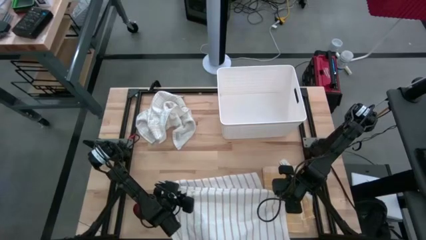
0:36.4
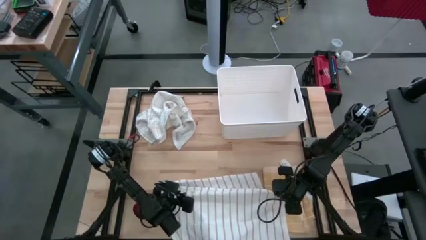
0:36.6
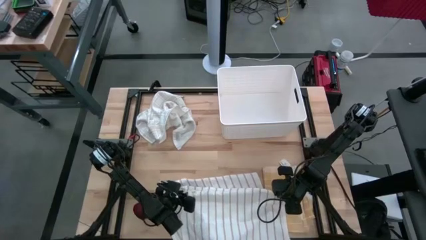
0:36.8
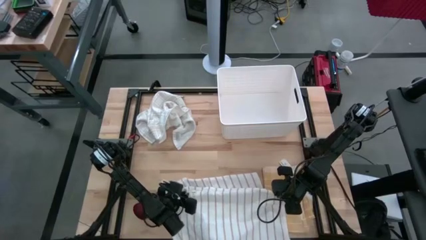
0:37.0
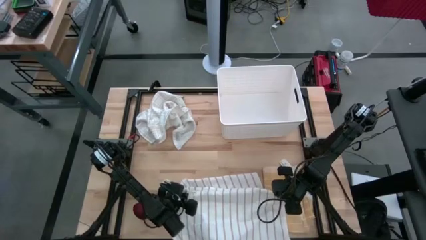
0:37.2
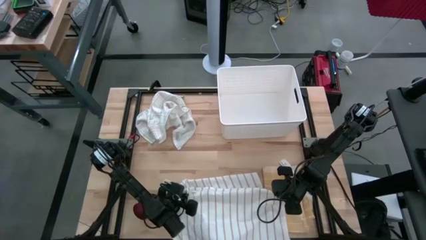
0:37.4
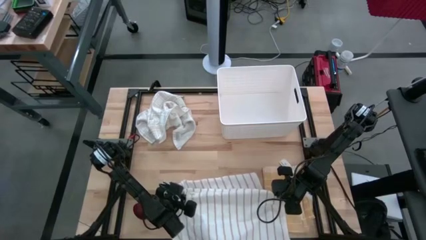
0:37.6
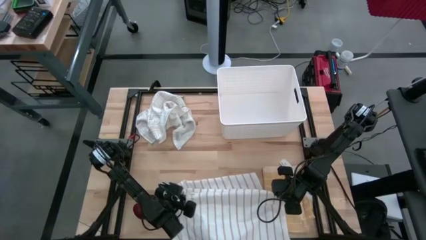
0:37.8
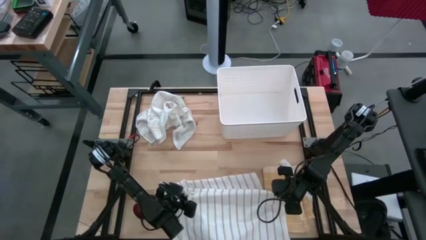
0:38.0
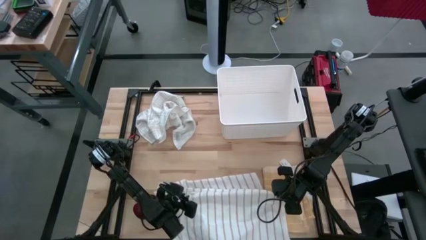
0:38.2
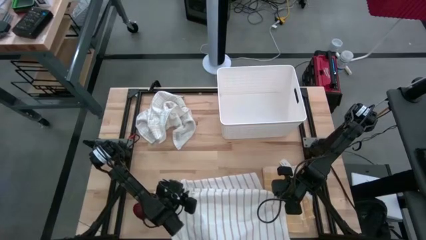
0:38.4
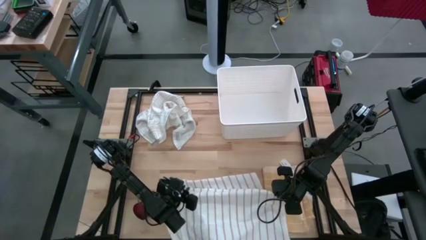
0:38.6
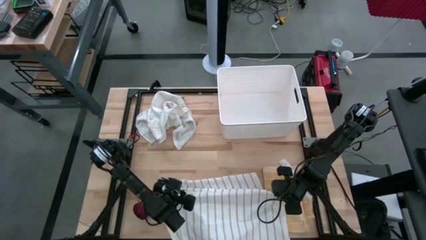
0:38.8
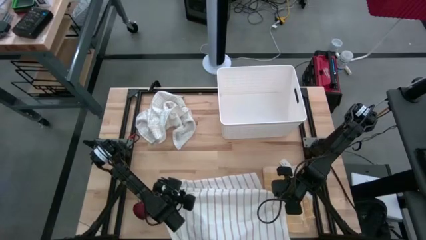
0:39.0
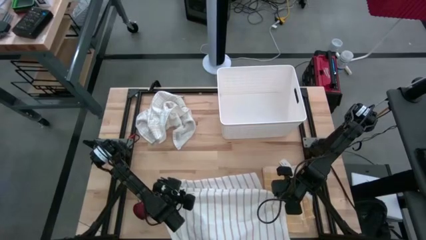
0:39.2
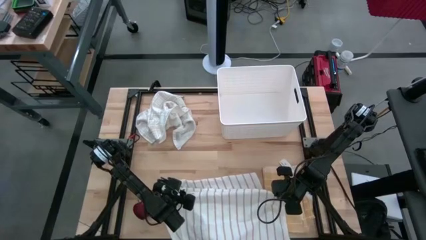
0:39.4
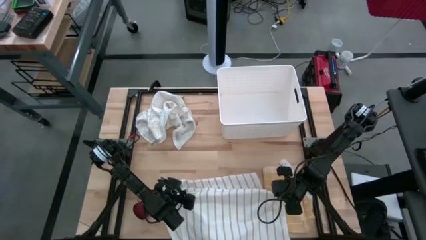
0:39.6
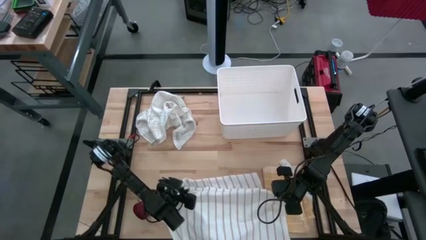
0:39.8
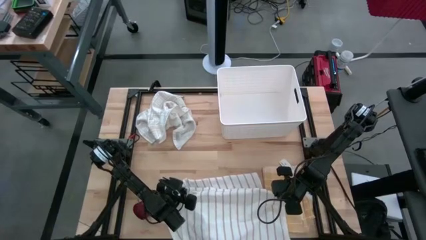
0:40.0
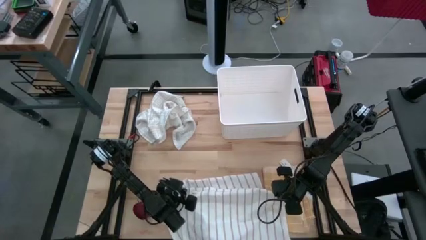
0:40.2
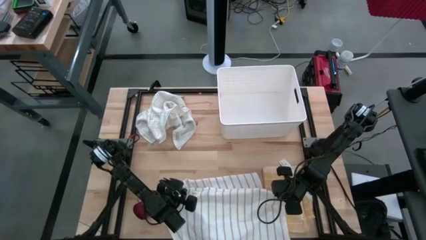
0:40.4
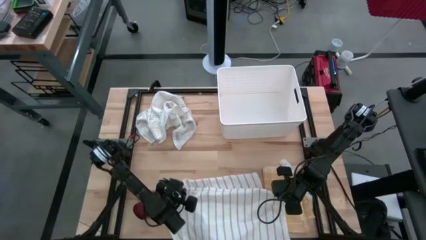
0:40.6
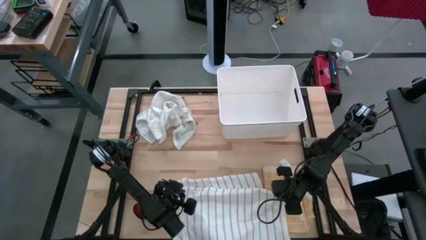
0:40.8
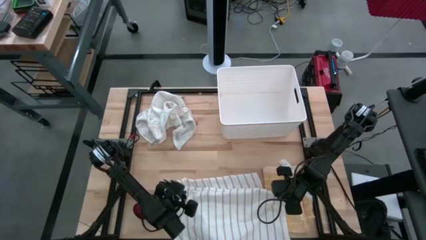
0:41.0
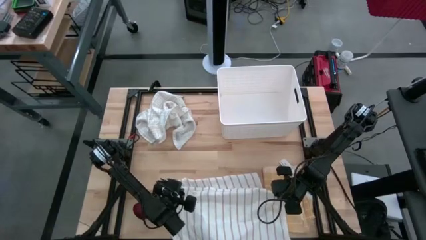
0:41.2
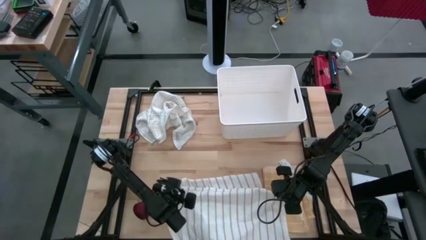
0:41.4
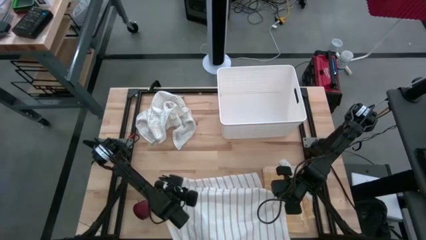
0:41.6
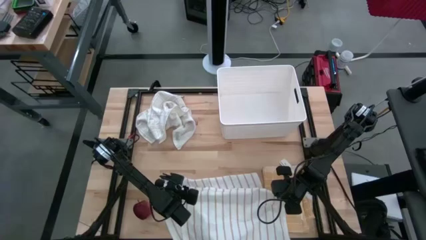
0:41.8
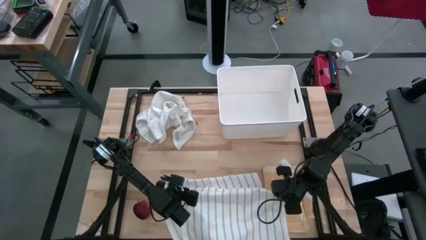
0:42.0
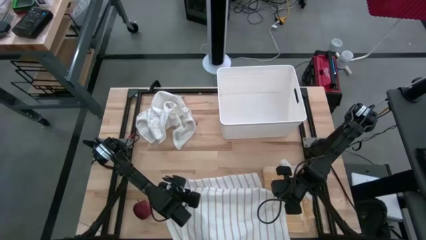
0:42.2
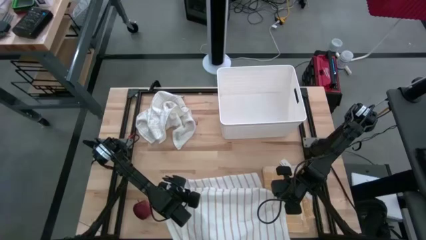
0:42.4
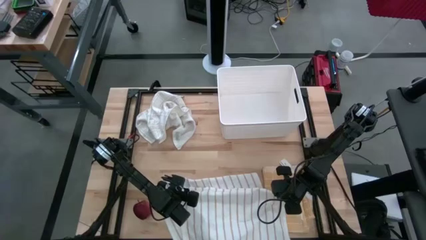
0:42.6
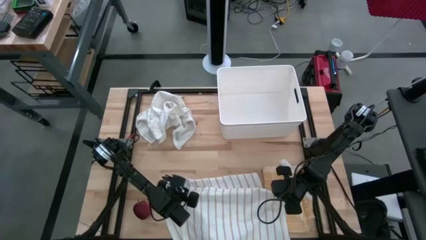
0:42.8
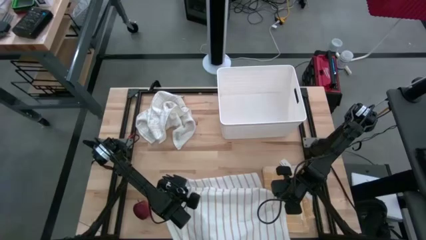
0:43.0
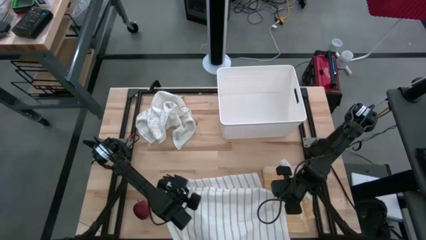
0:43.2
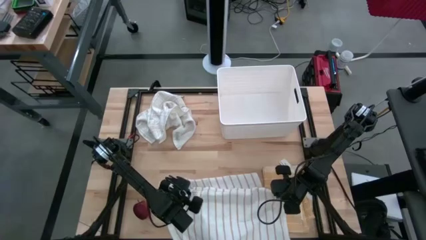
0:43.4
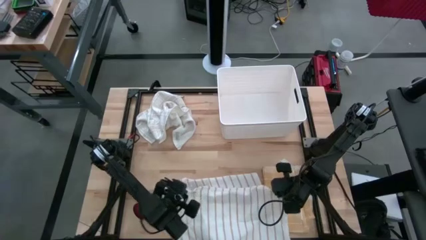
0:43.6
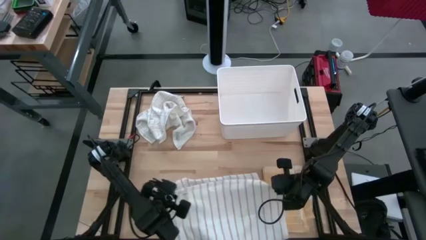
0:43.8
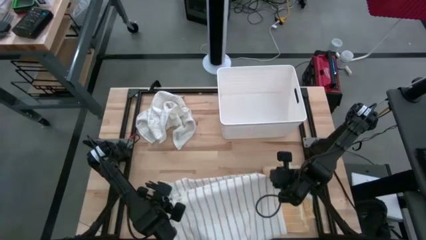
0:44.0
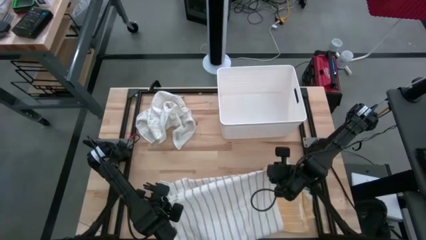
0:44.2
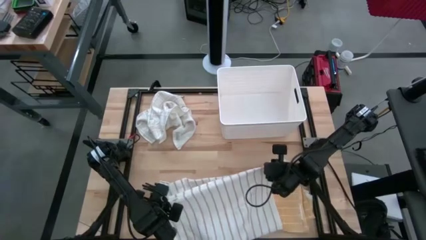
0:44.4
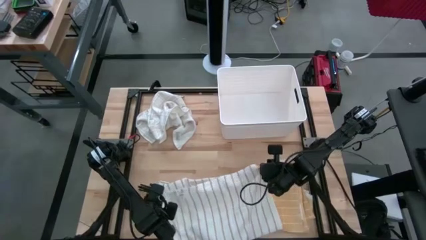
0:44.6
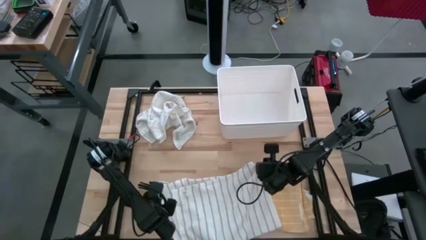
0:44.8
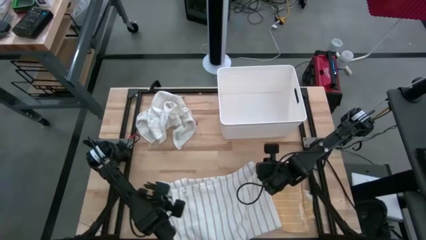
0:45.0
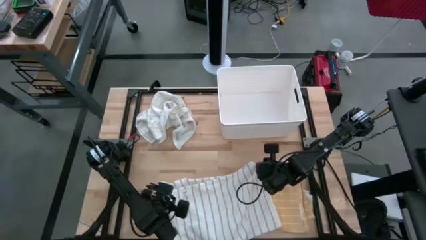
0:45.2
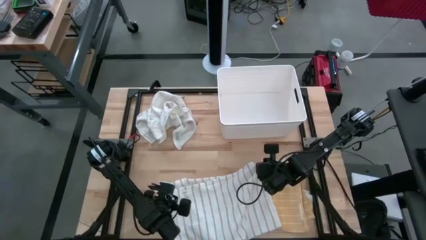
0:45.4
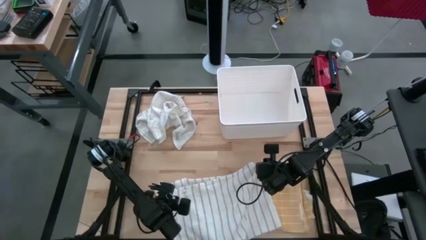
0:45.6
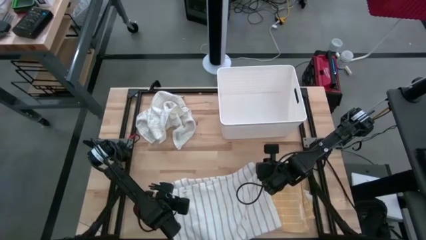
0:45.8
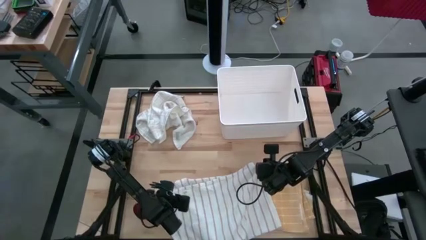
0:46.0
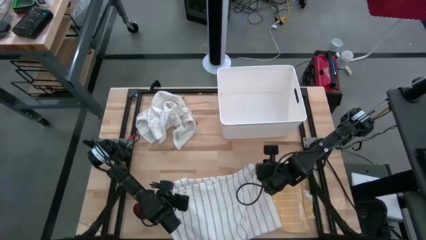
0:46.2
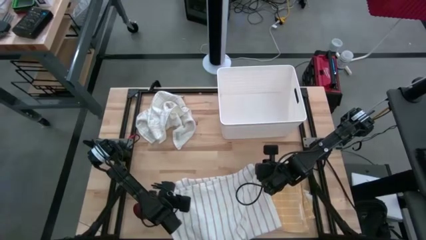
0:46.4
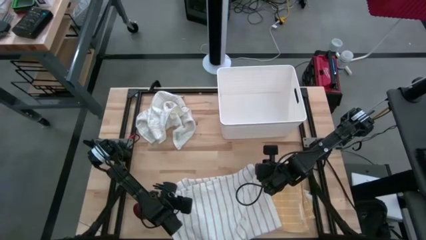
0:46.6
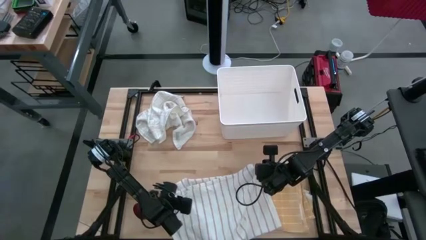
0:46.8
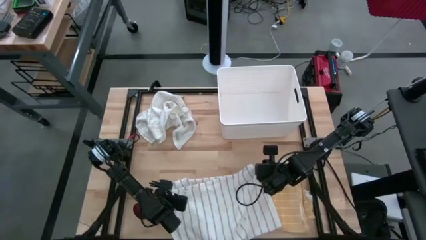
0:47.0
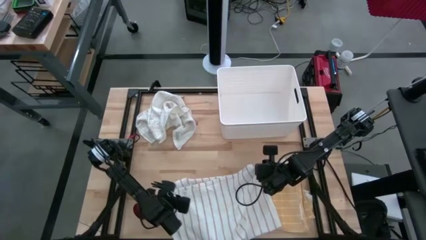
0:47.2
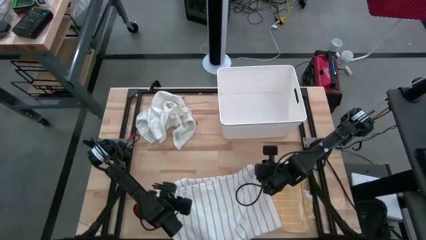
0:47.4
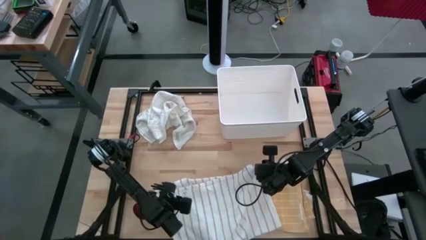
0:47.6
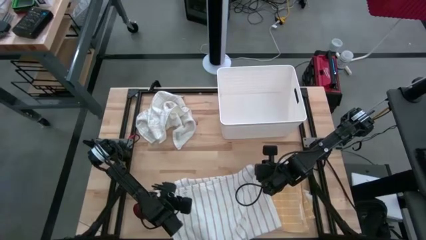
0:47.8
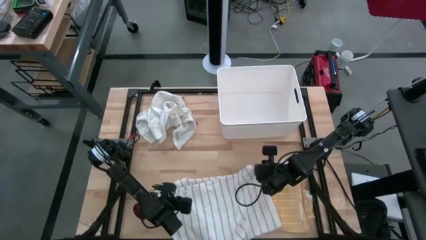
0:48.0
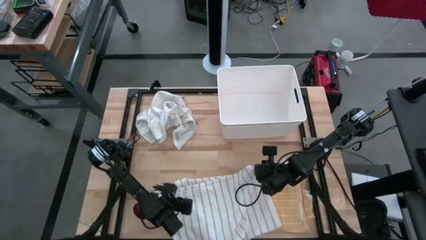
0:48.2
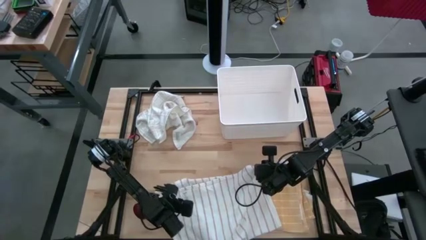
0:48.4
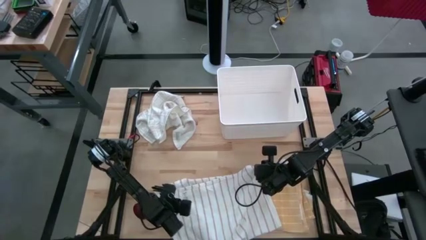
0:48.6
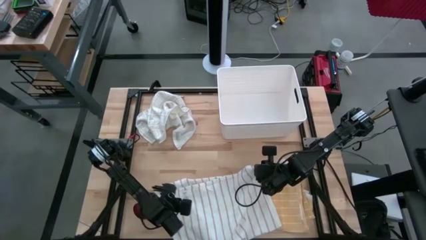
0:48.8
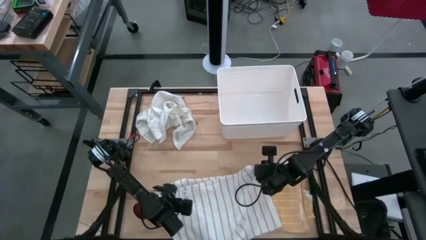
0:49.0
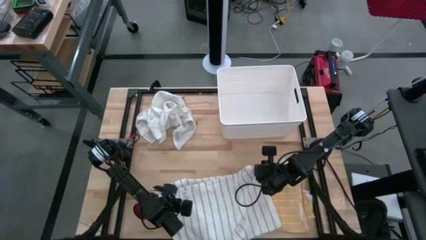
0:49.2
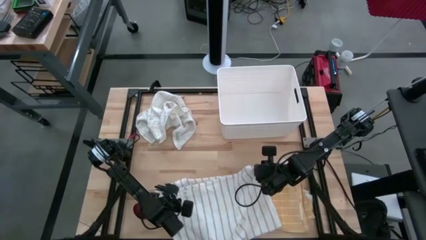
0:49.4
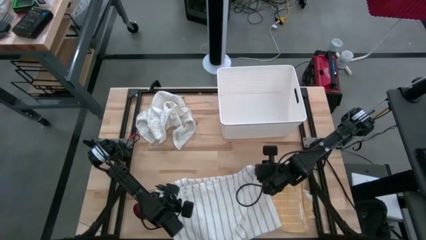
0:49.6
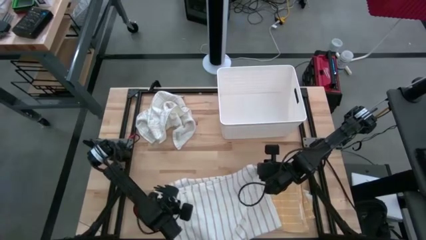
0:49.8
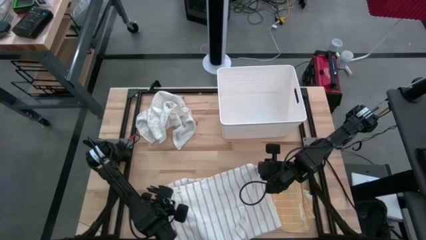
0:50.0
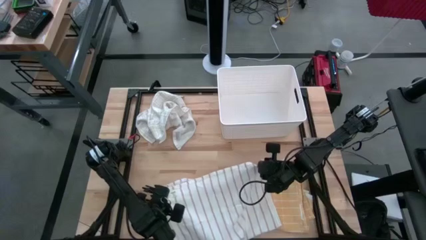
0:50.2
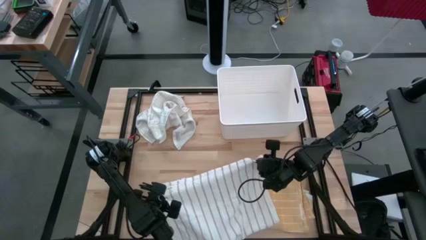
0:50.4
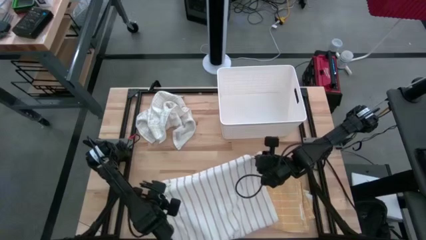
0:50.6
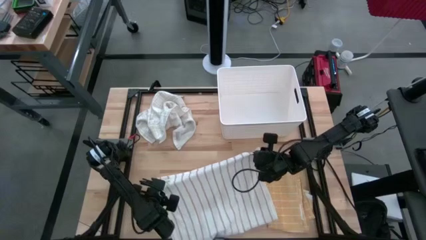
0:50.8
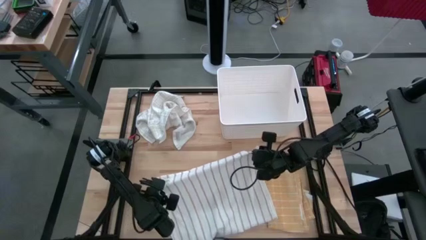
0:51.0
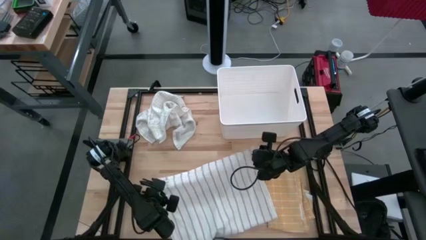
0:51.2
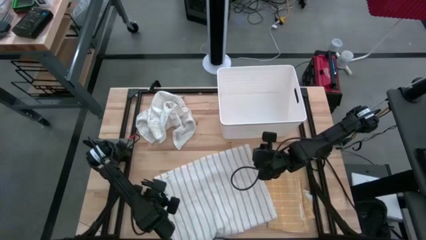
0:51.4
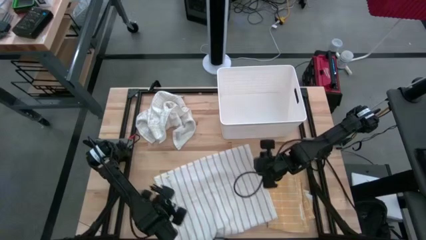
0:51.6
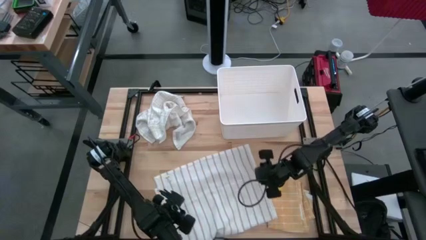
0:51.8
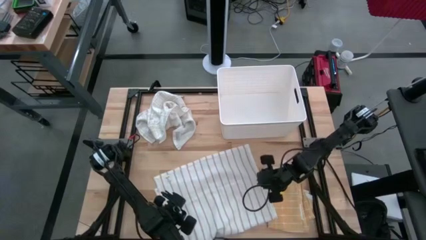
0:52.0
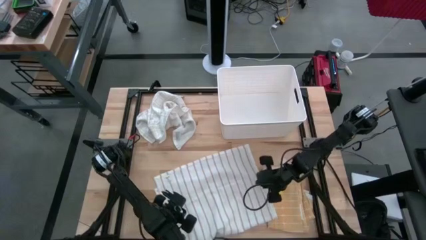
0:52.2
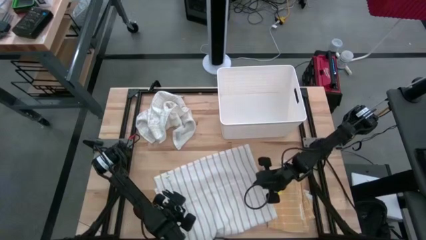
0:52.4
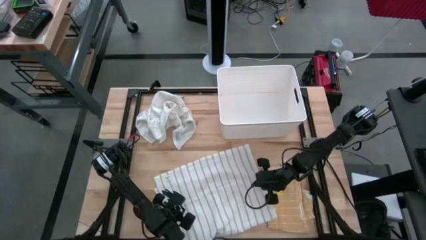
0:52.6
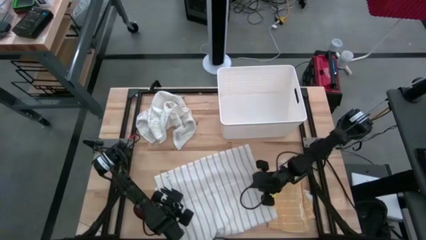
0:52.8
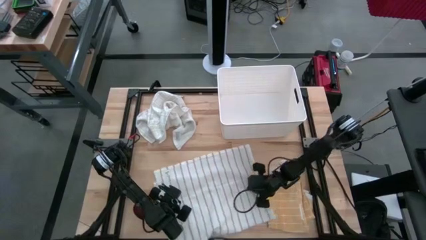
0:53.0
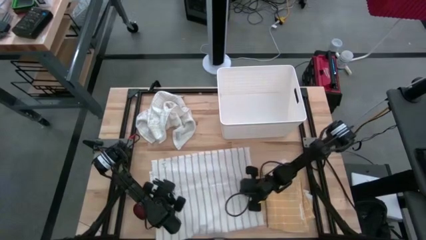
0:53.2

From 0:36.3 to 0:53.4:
Task: Fold towel
Fold the white striped towel
